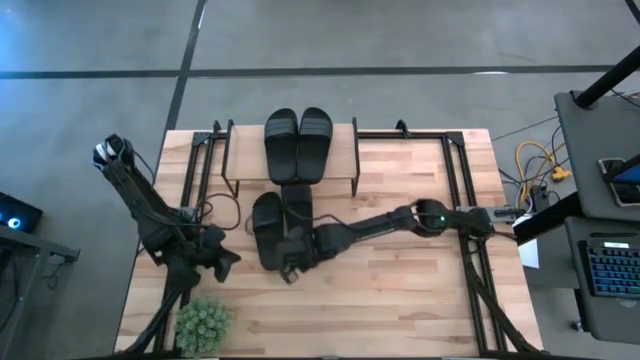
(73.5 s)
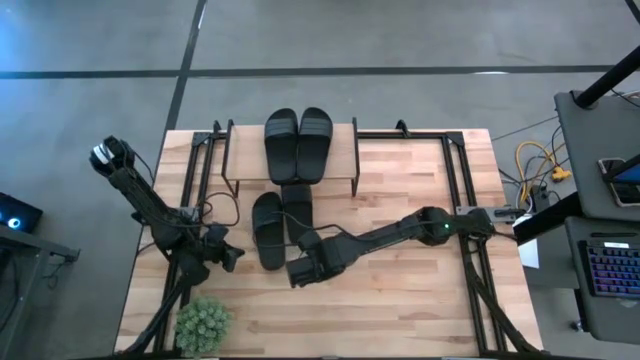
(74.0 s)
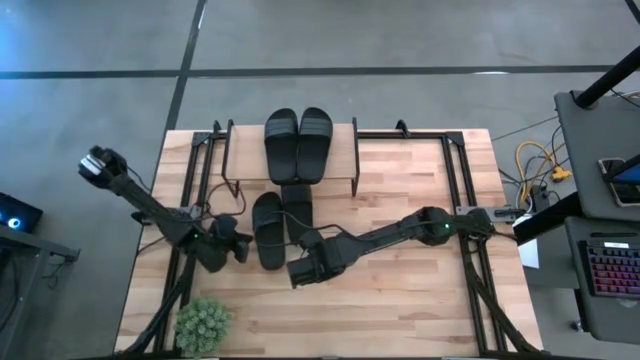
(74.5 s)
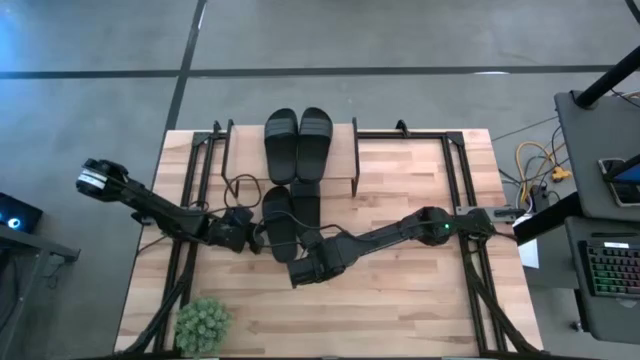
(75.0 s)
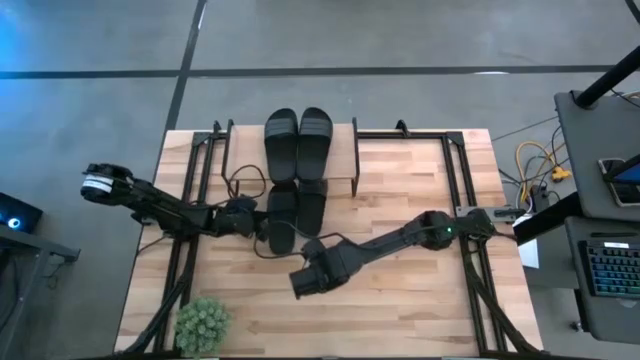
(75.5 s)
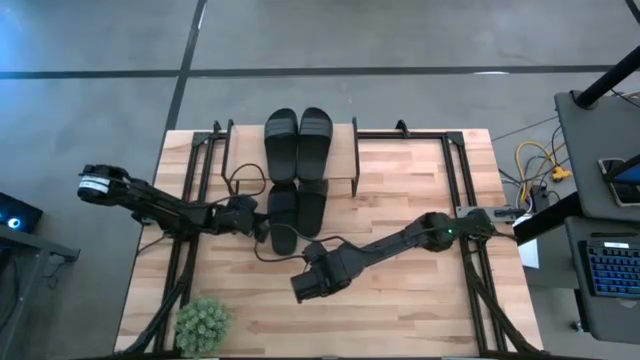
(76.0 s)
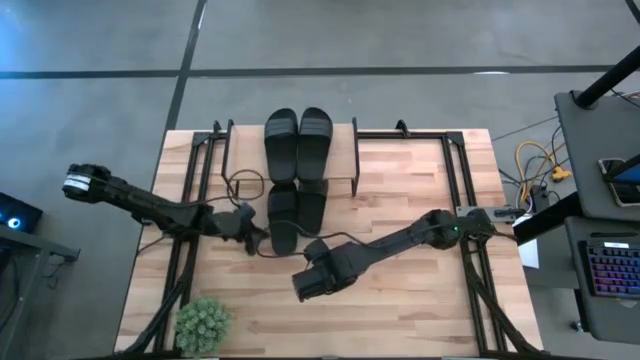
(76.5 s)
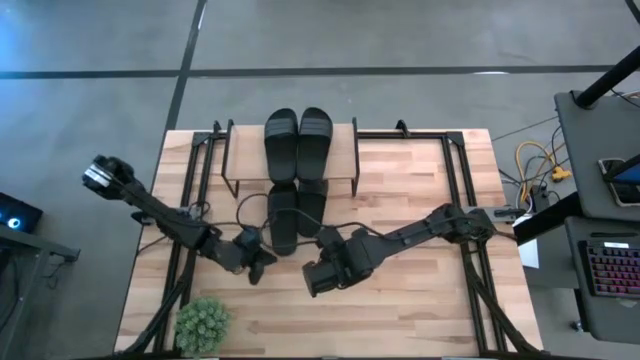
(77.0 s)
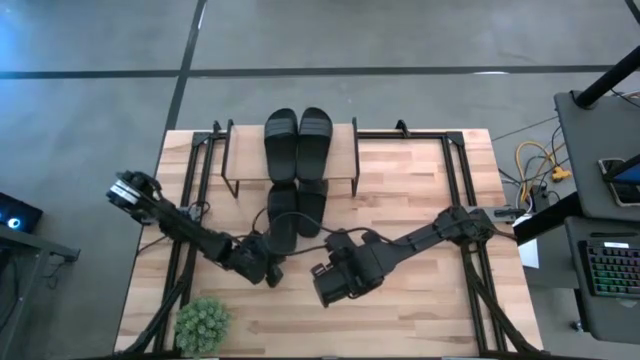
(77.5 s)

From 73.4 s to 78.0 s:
Task: Pick and place slides into the shelf
Put the black slide under the shelf

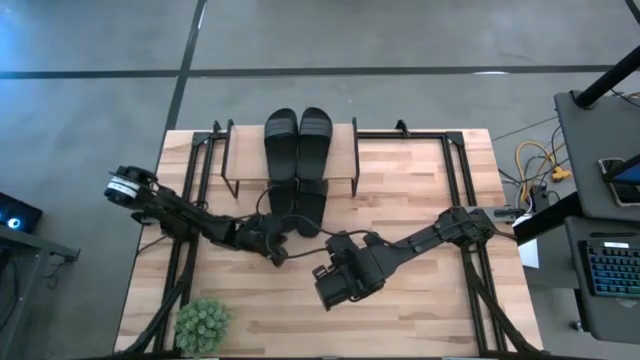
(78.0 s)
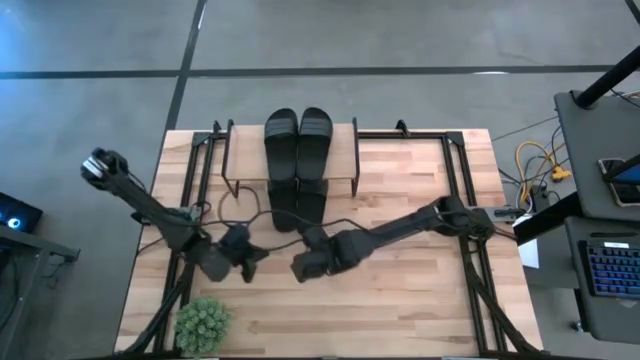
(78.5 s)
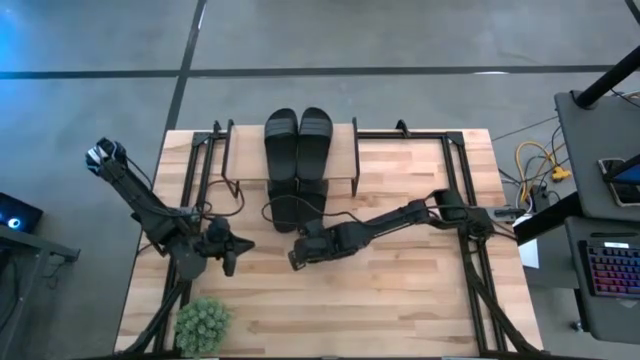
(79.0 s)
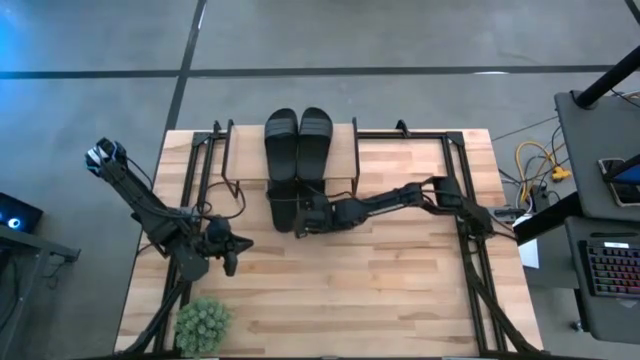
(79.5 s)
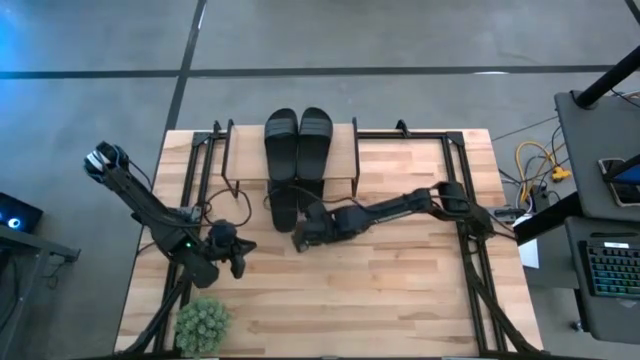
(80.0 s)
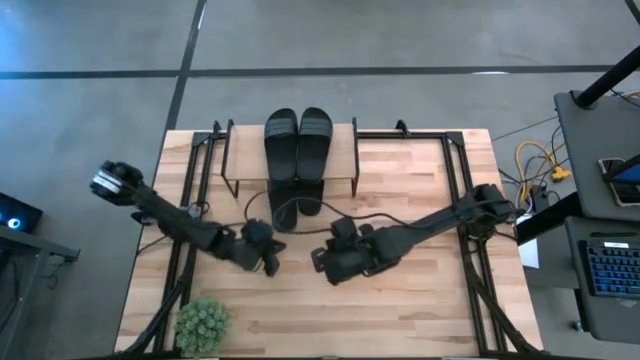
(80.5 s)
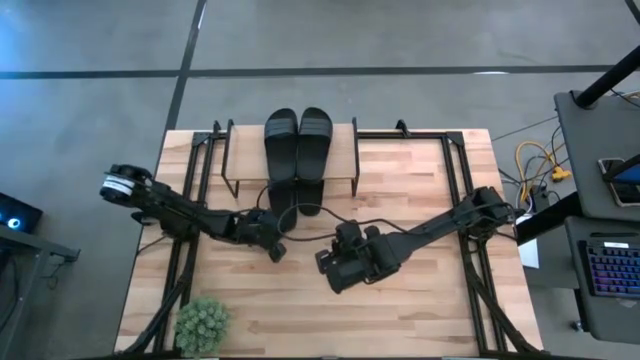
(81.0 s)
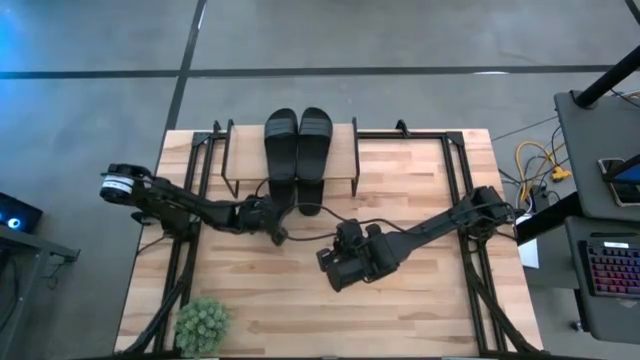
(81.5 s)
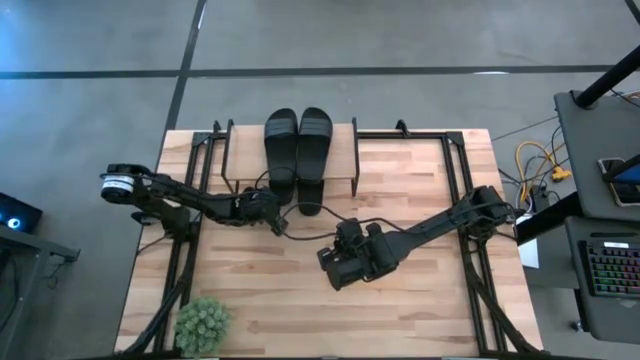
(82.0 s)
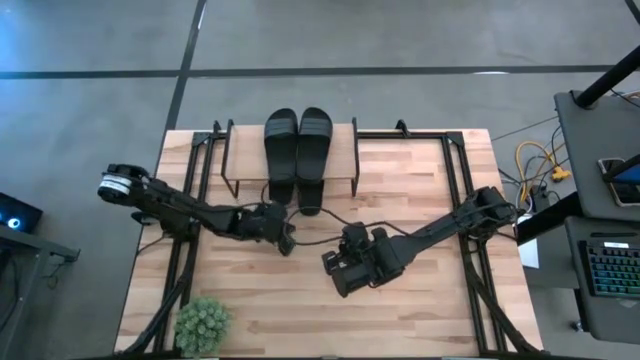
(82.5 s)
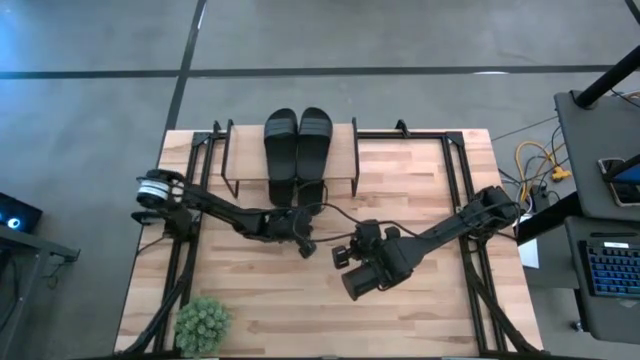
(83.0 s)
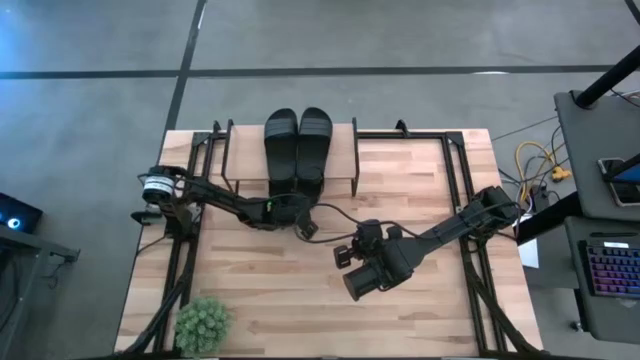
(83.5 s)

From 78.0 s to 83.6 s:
Adjust the black slides under the shelf

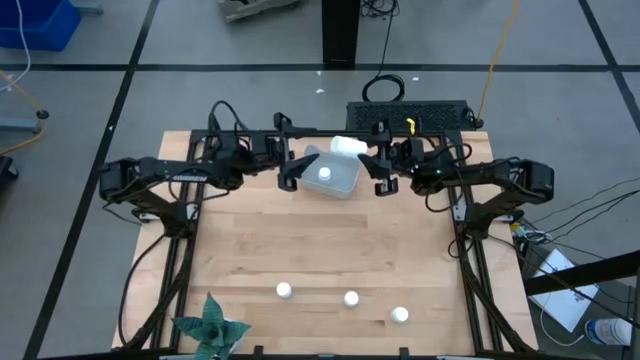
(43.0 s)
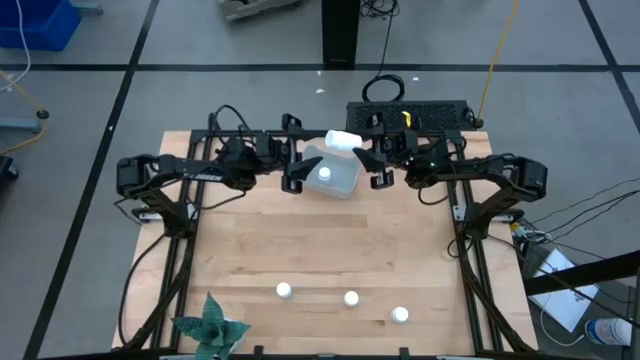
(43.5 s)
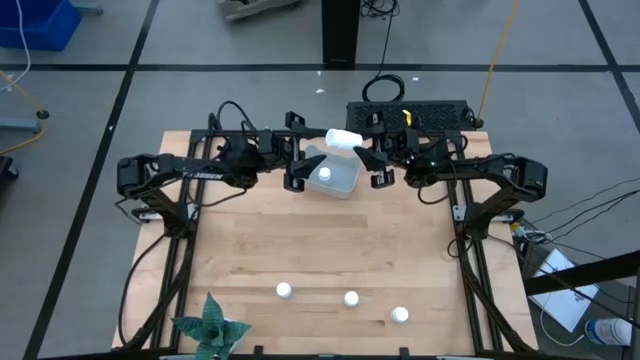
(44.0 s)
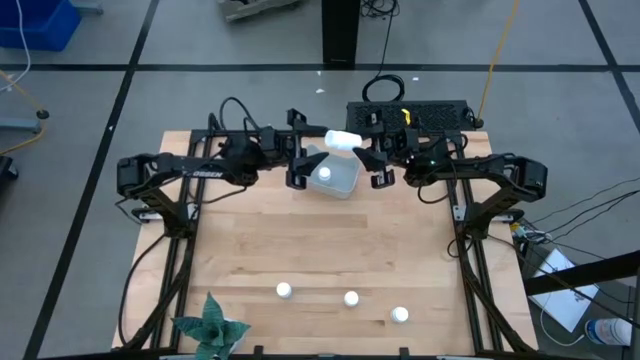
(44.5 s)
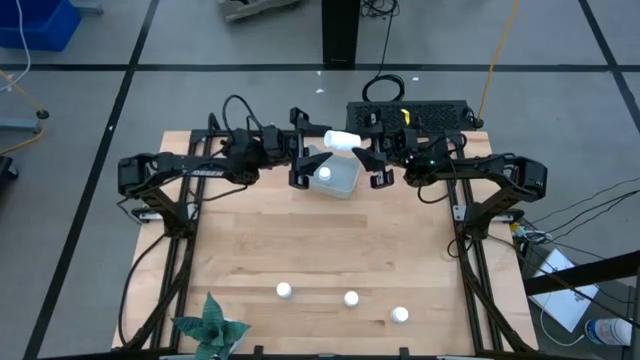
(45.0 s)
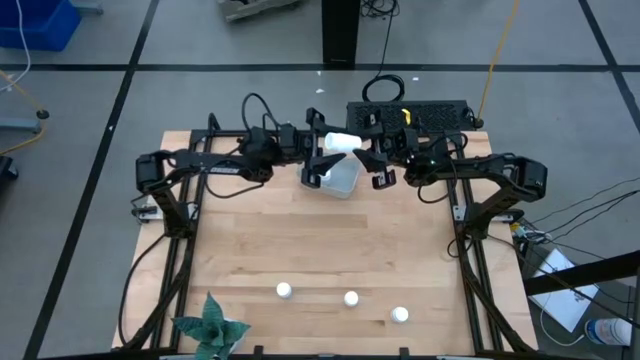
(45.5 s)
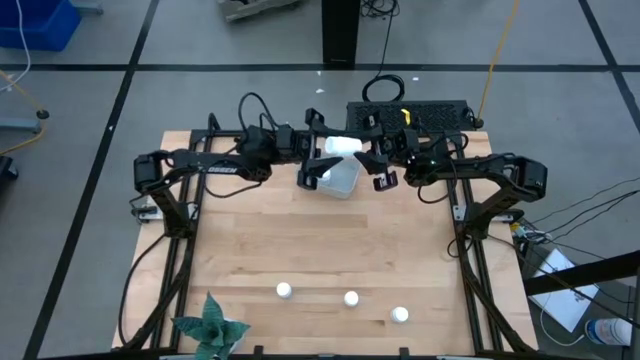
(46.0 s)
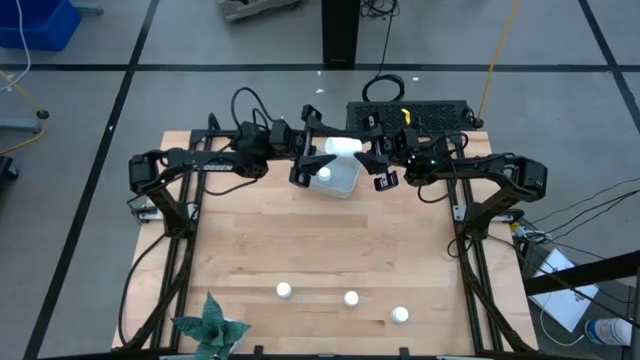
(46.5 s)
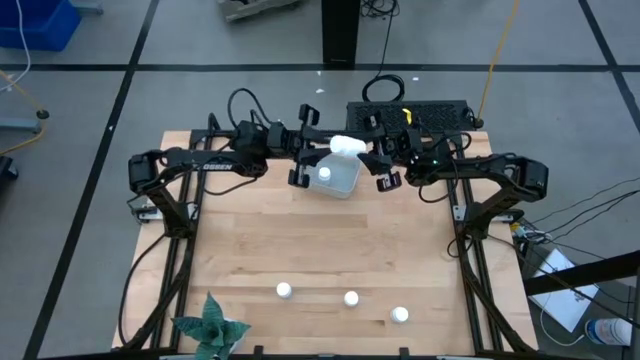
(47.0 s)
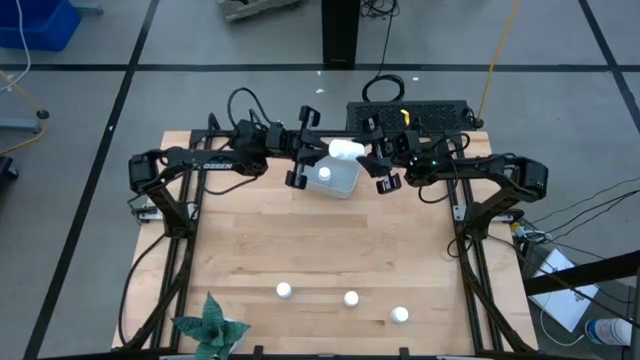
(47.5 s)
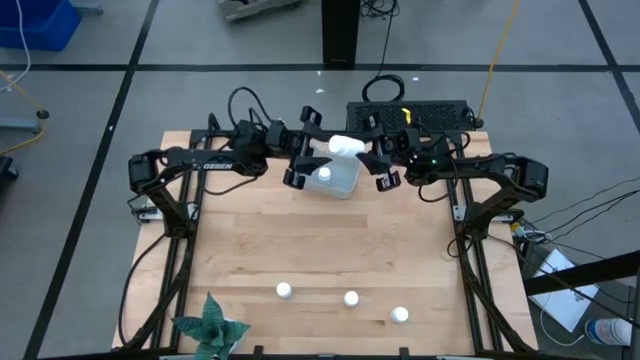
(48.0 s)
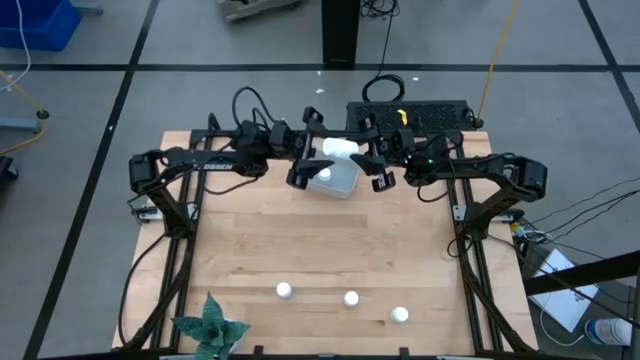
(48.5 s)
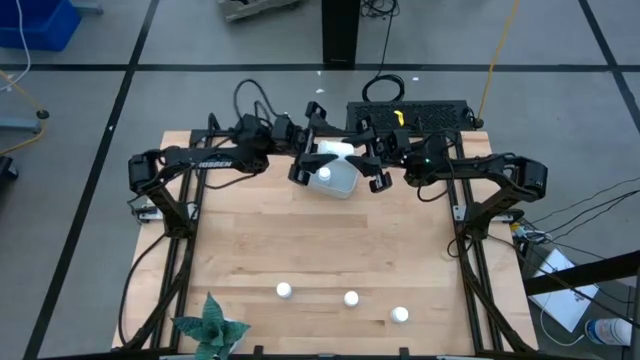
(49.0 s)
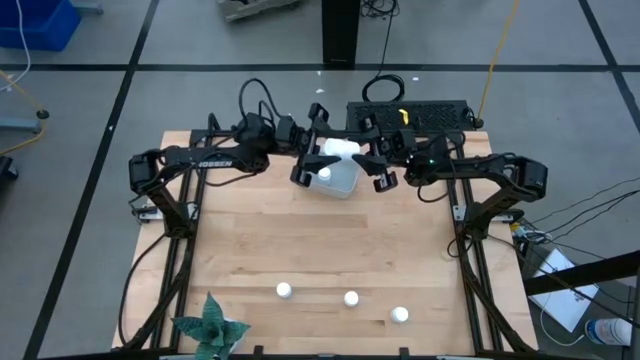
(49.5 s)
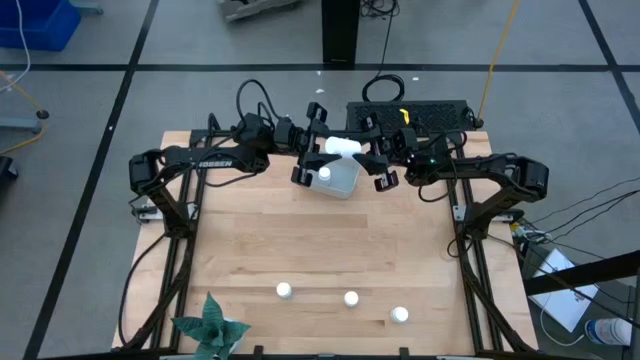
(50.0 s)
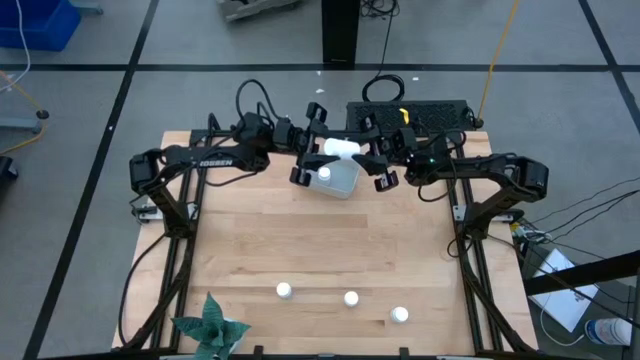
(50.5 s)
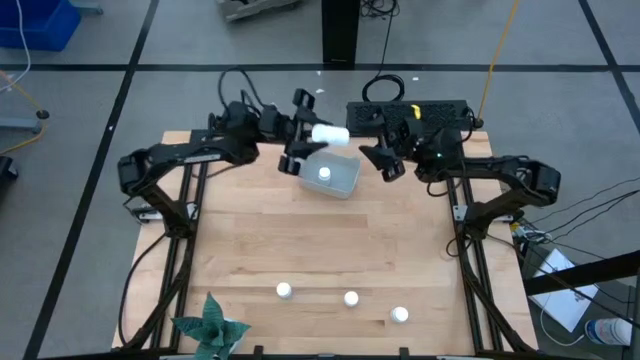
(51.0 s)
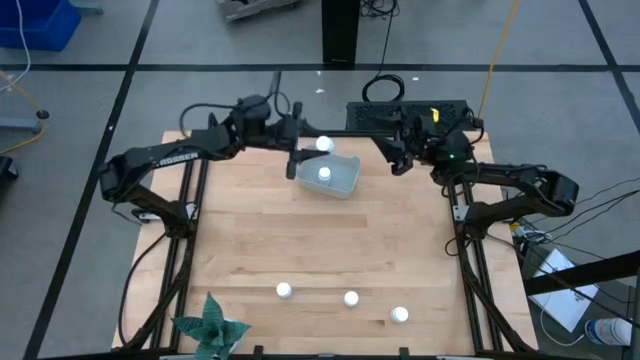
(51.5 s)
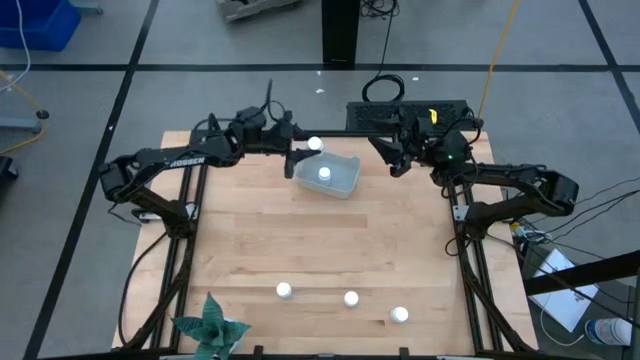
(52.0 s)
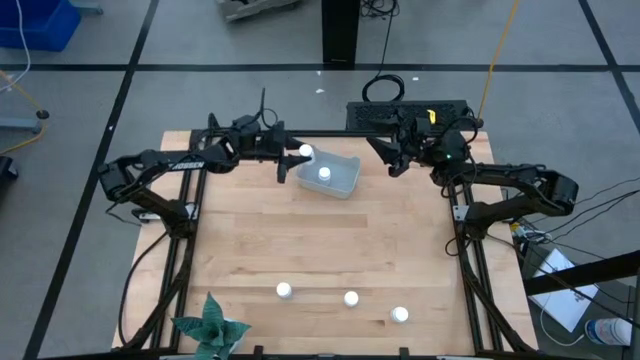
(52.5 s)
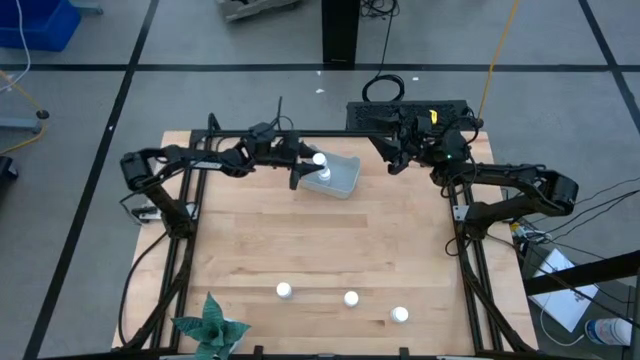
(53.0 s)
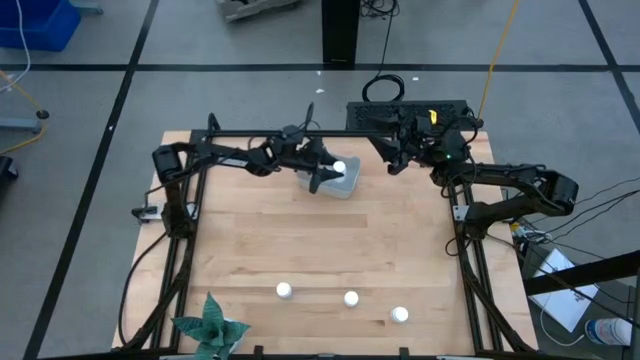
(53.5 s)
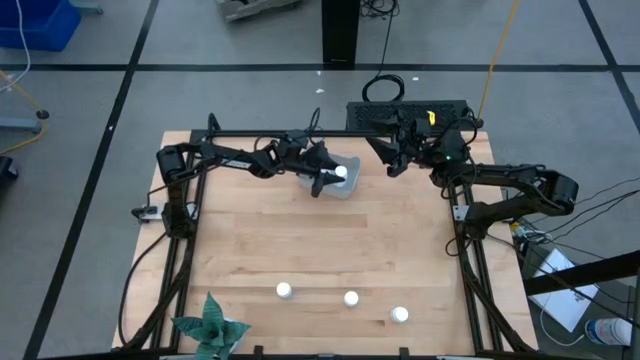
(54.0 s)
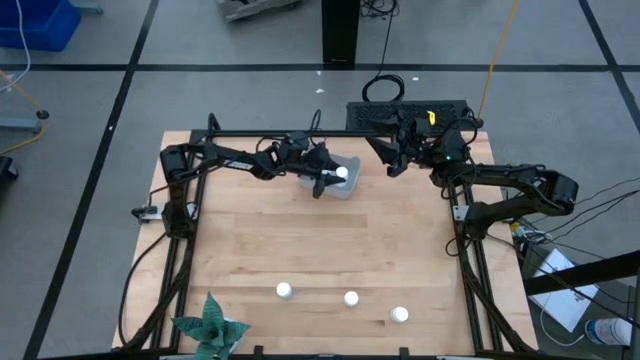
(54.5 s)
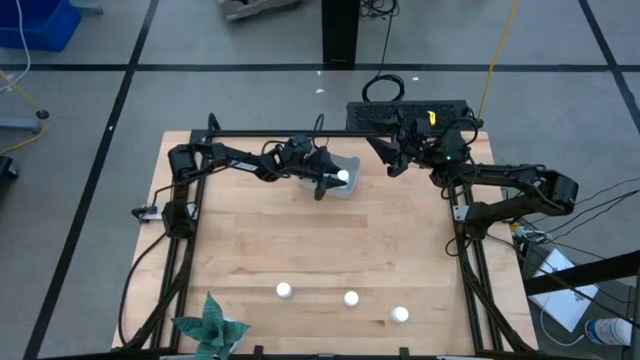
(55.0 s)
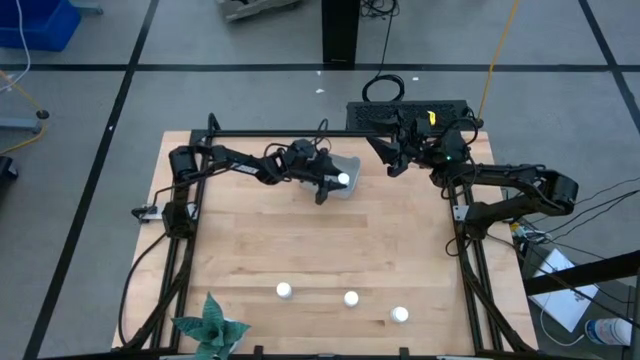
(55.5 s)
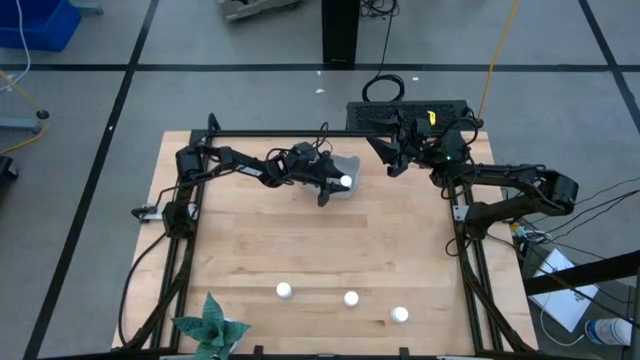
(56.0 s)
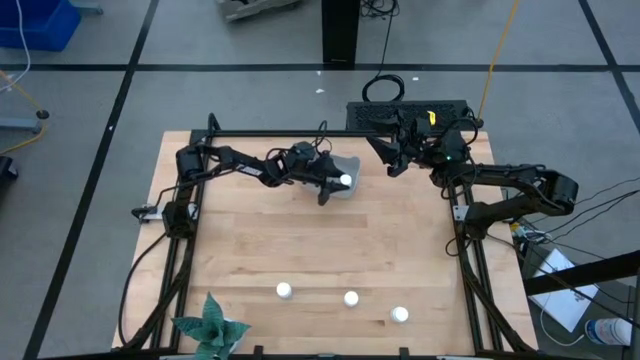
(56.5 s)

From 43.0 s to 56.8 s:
Task: Pick and place pill bottles into a basket
Put the white pill bottle into the gray bin
